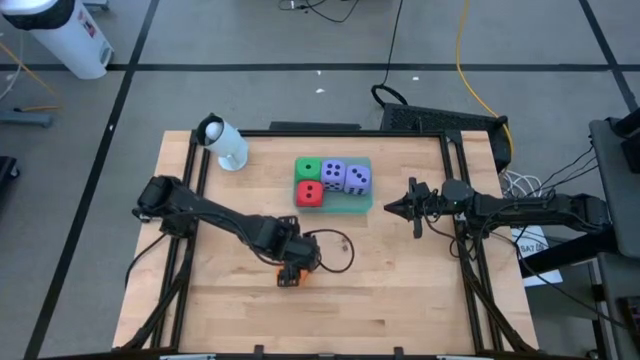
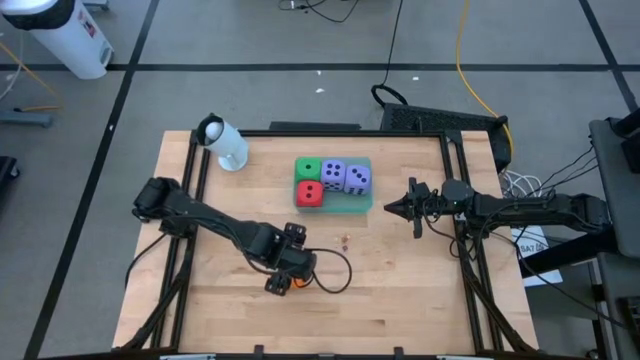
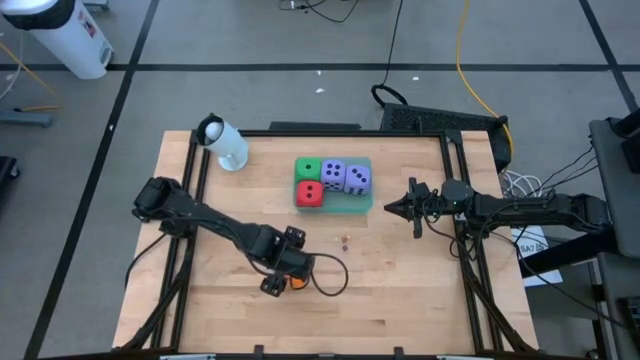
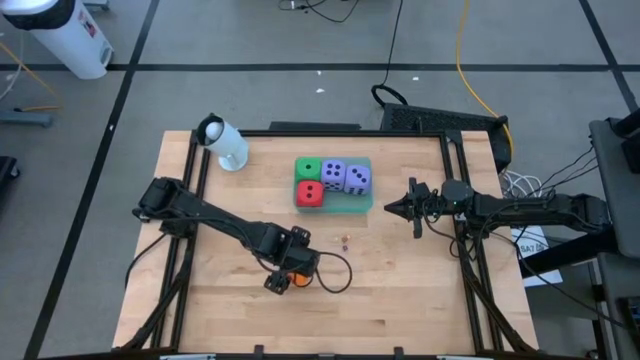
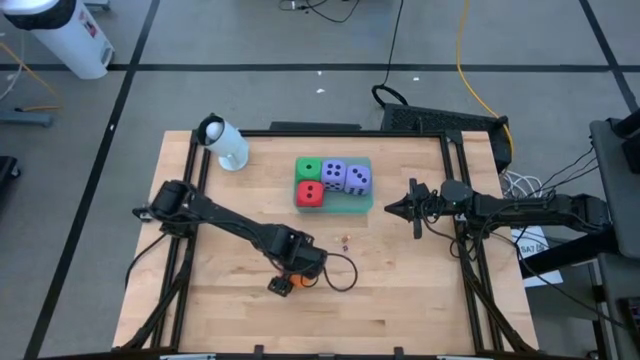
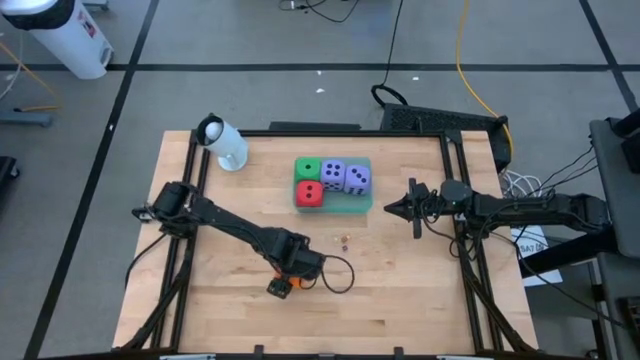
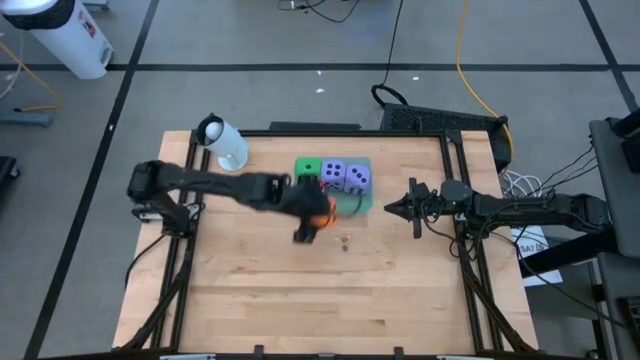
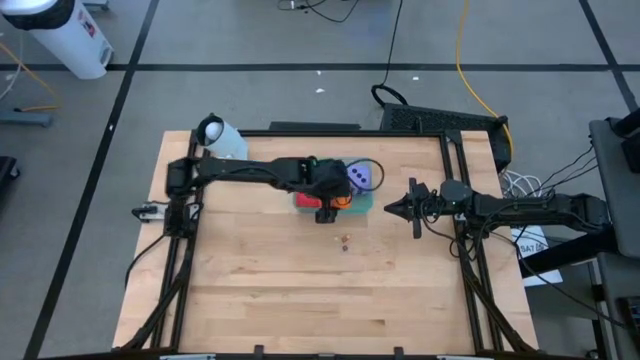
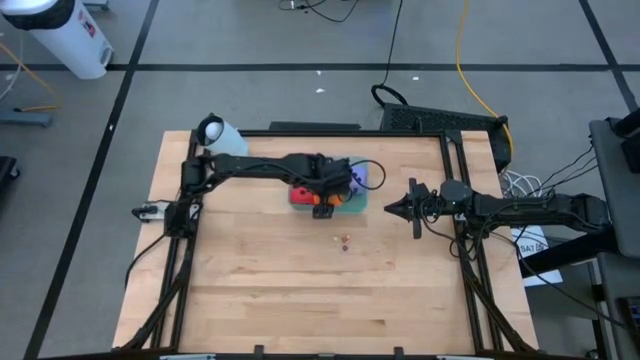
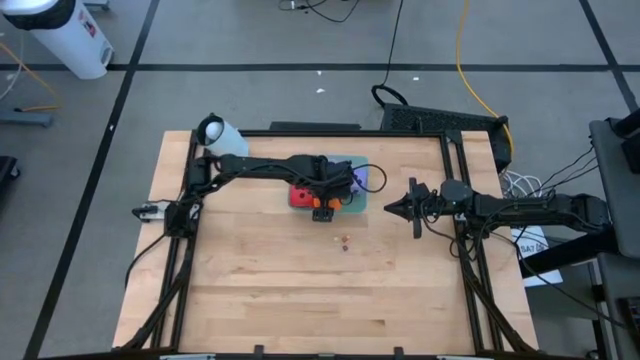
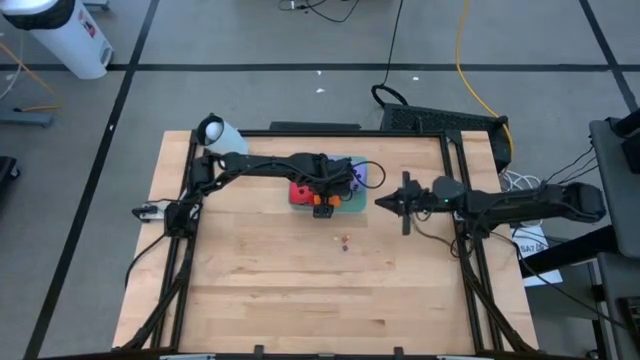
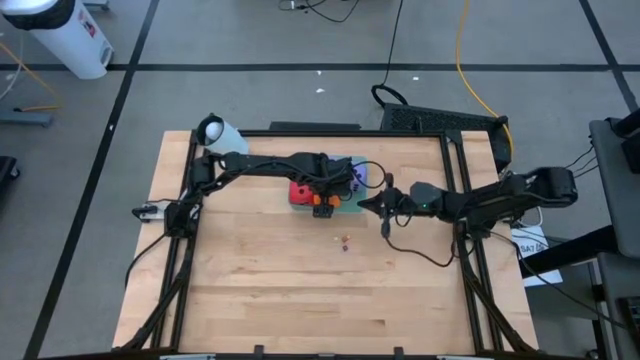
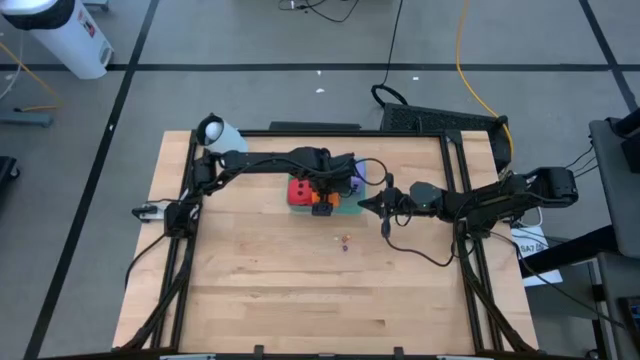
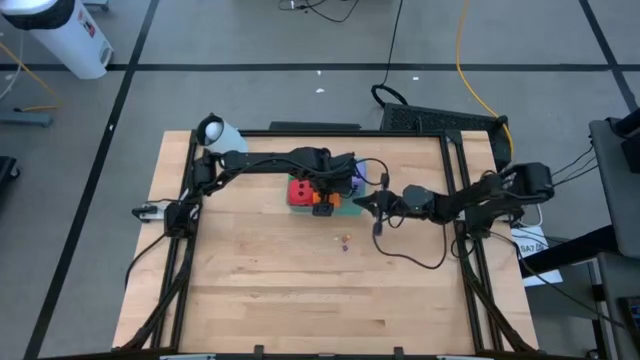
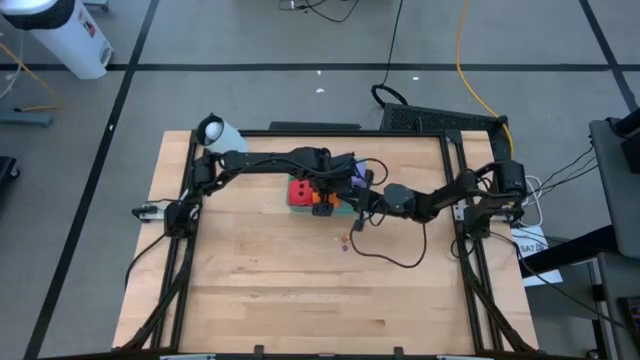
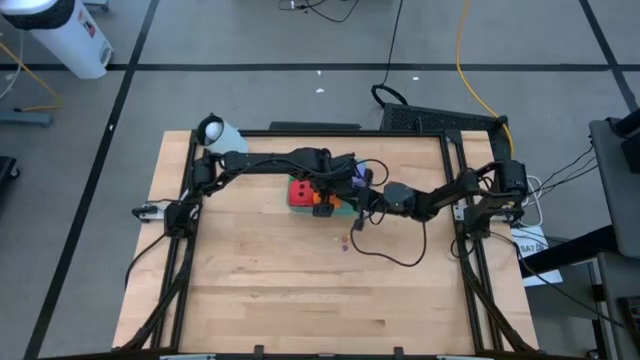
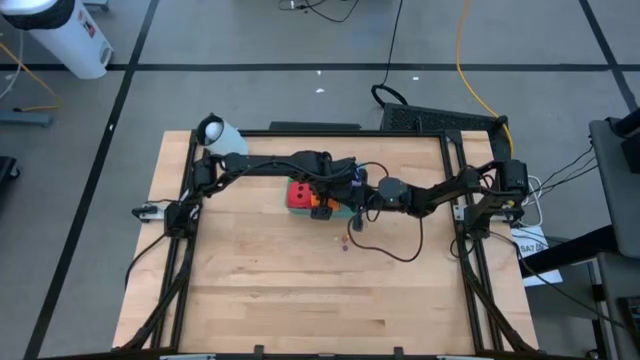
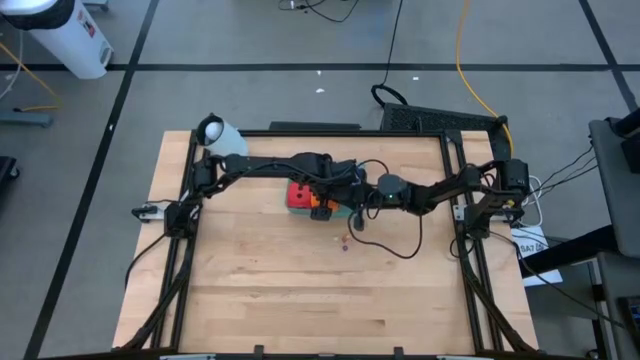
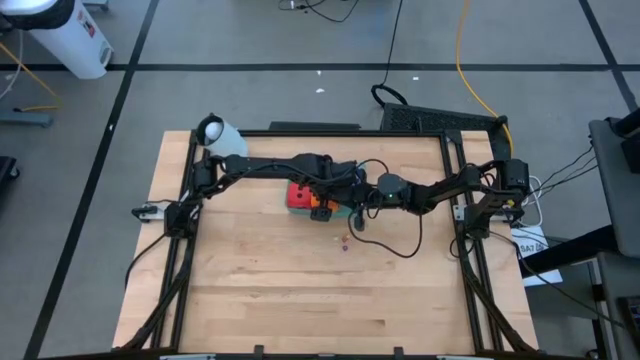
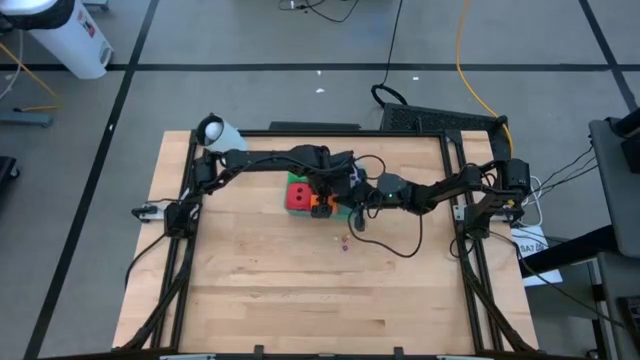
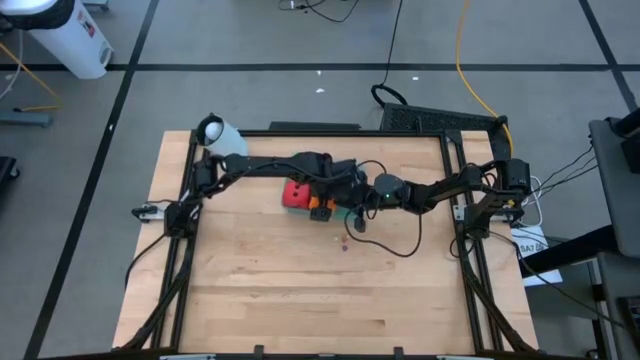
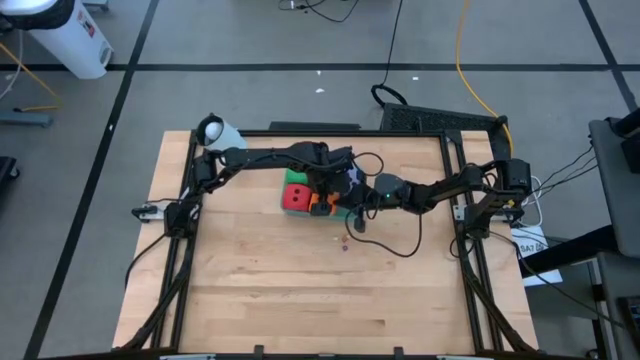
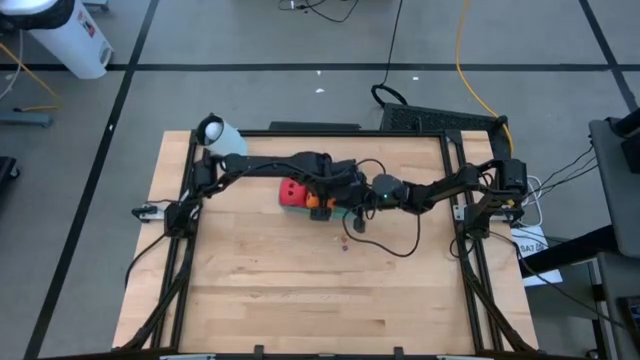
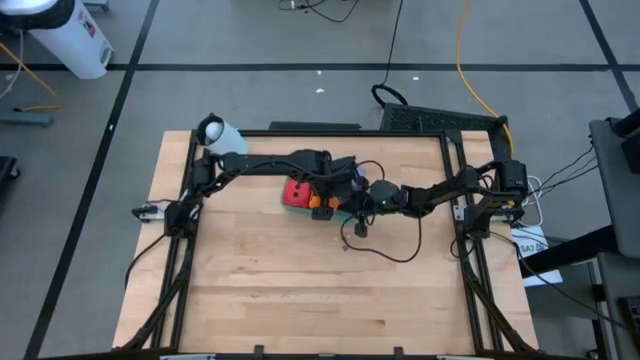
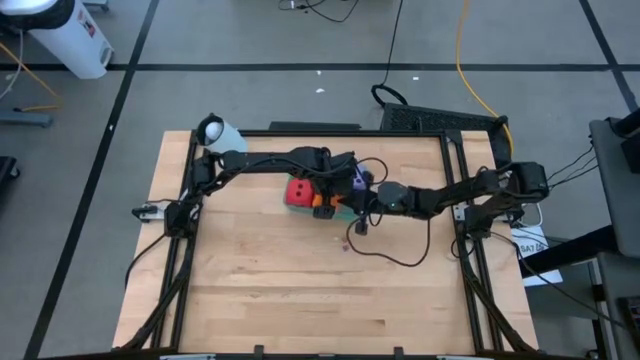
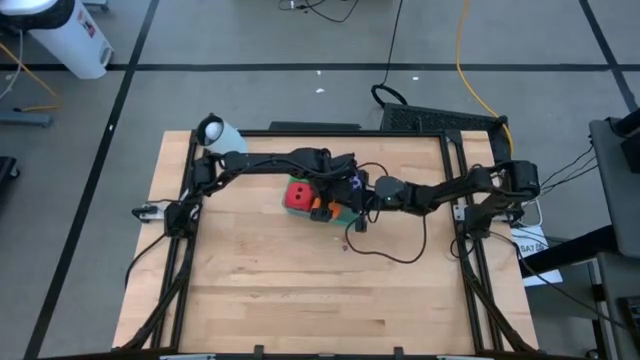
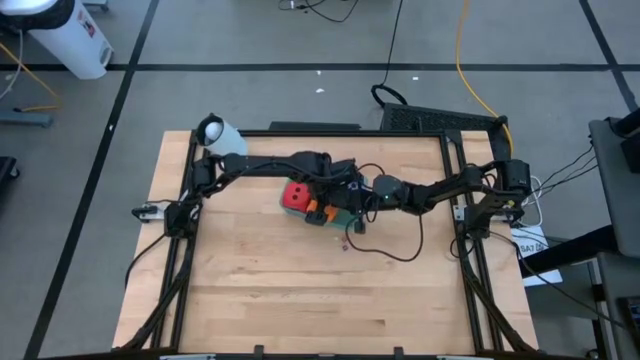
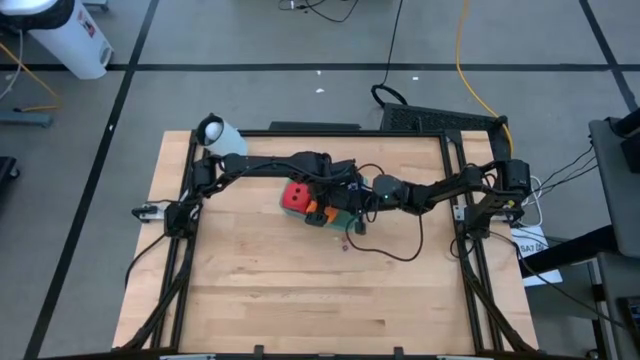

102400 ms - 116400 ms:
Task: Pick & Place Dice
Put the large orange dice into the blue bin

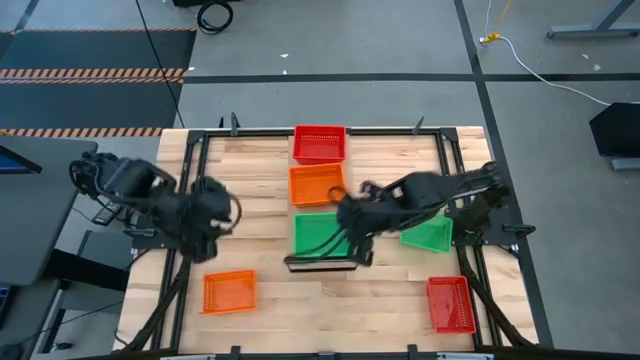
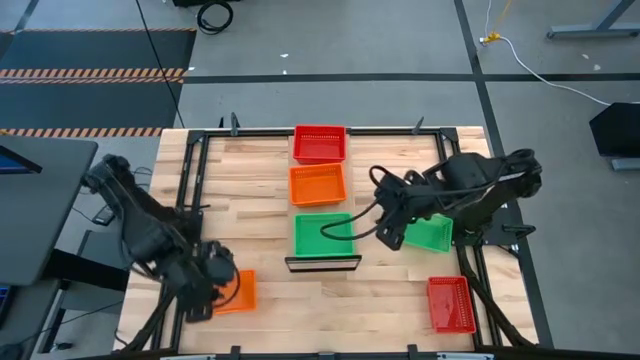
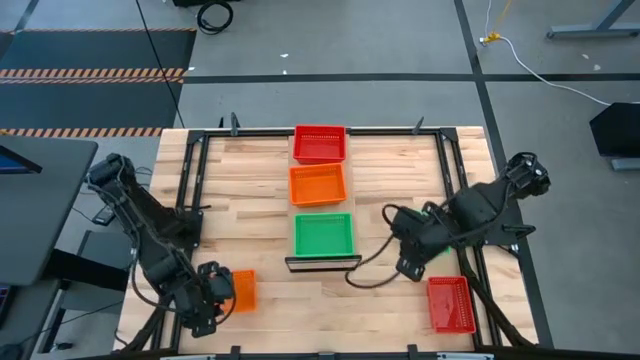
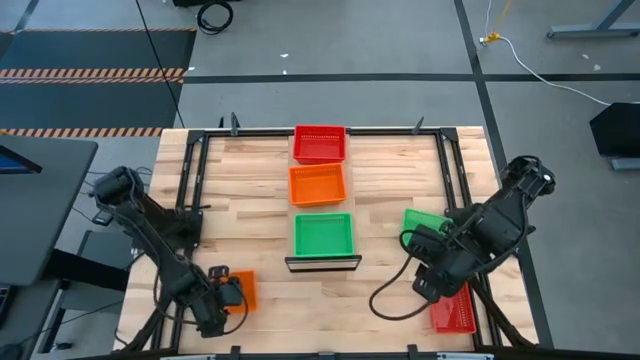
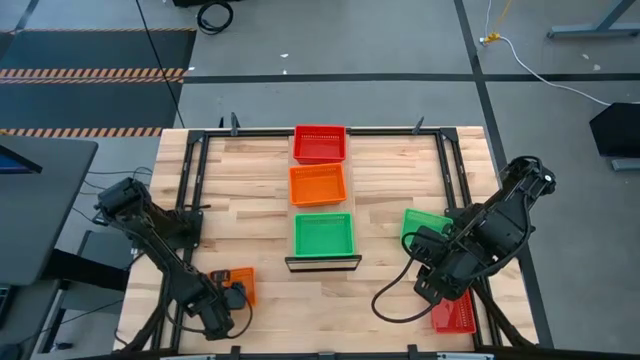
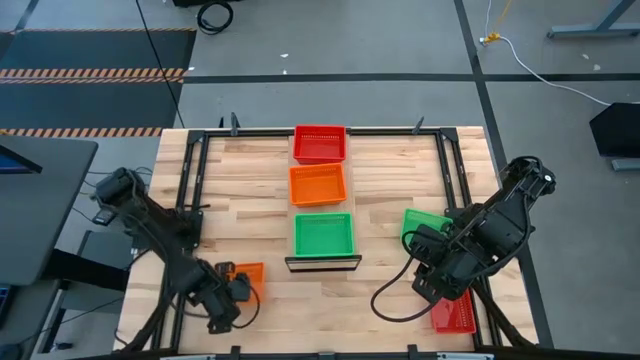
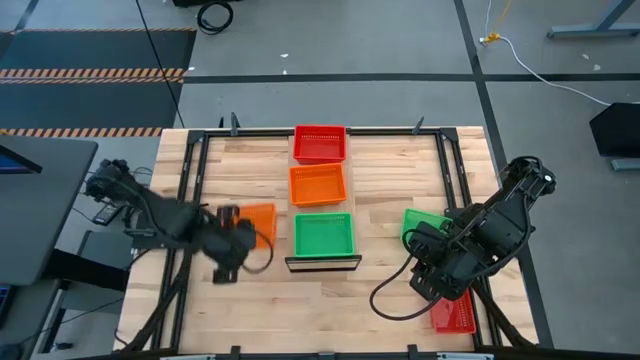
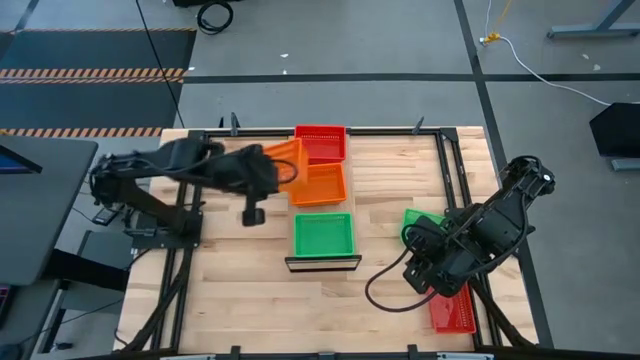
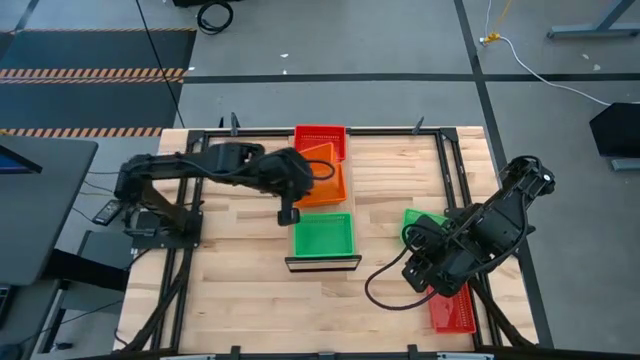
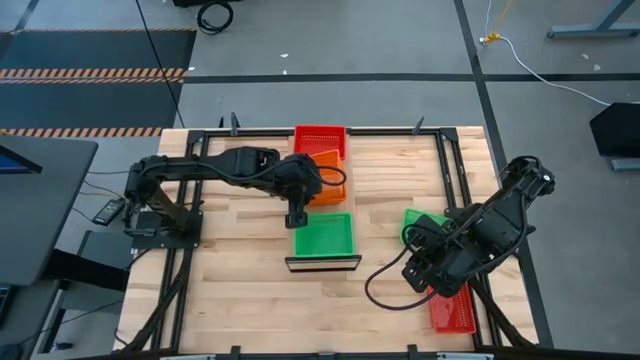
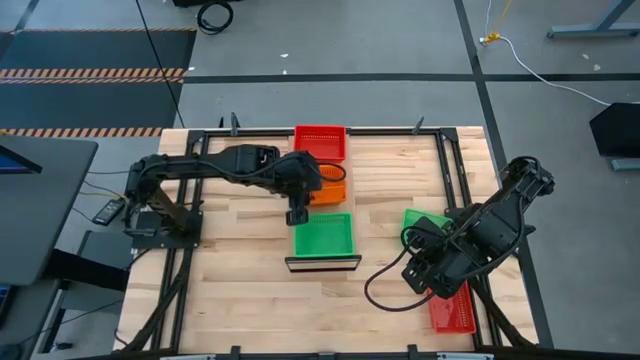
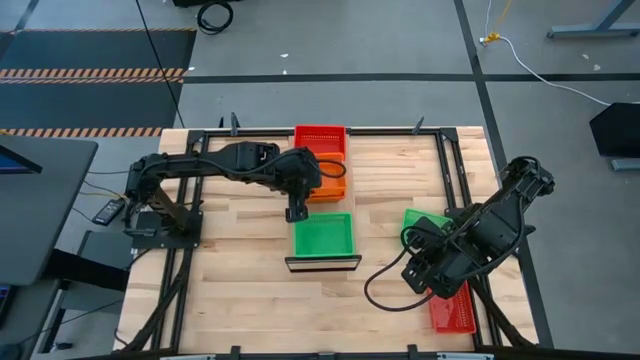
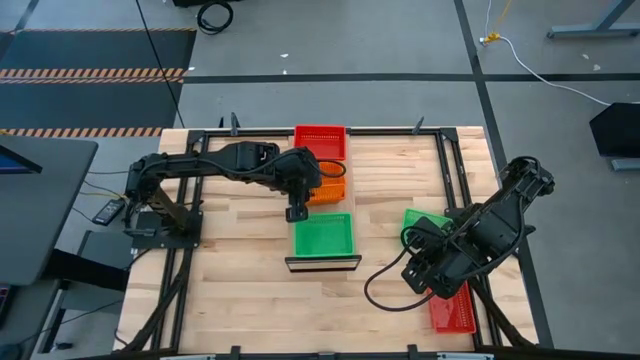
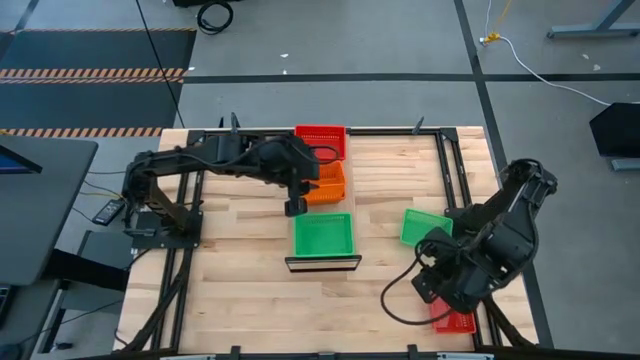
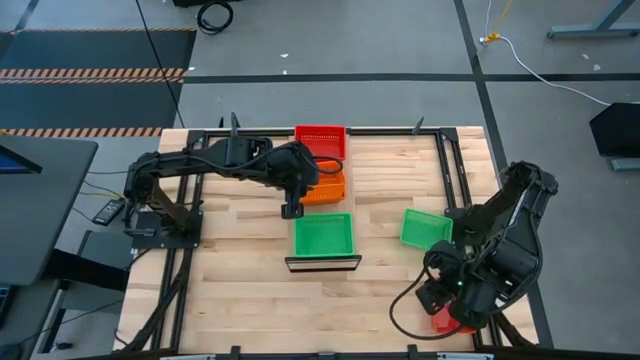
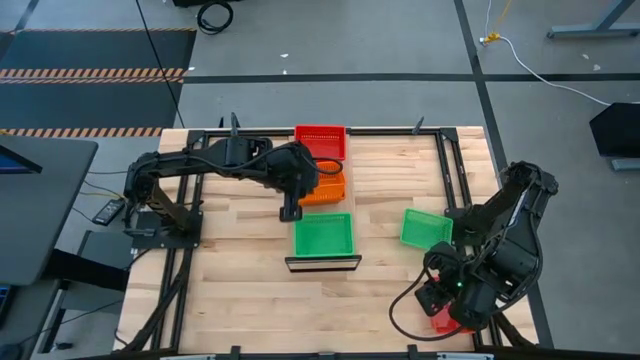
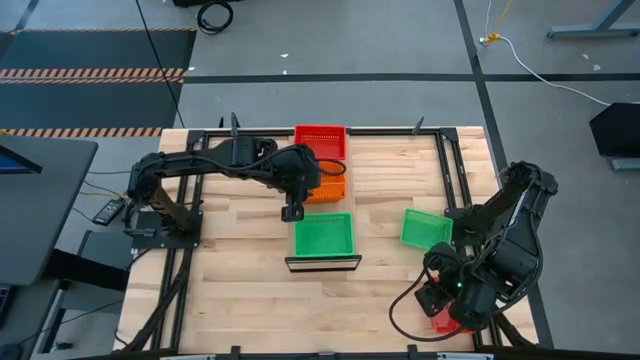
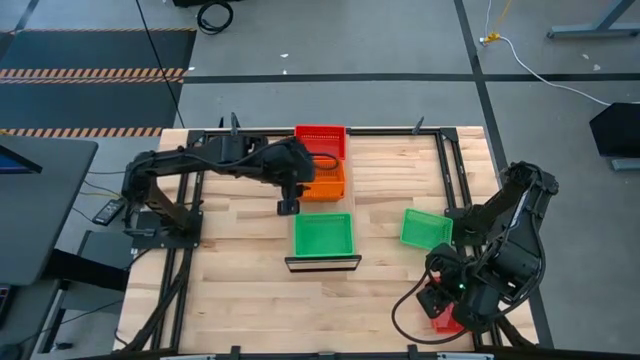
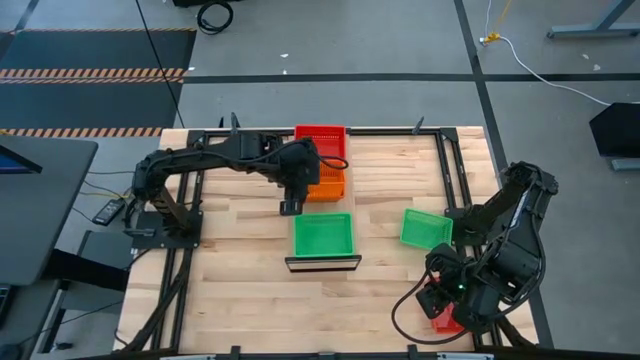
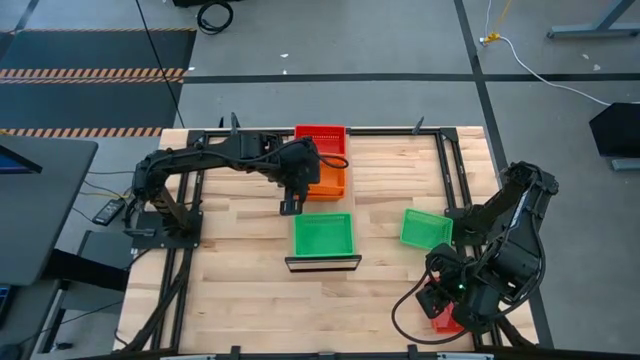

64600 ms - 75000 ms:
Task: Stack baskets on shelf by color
Stack the orange basket on top of the orange baskets on the shelf
